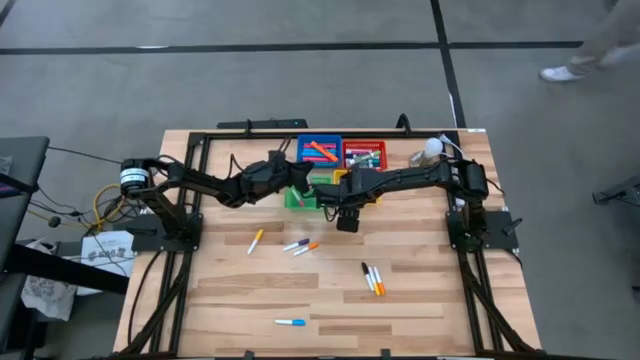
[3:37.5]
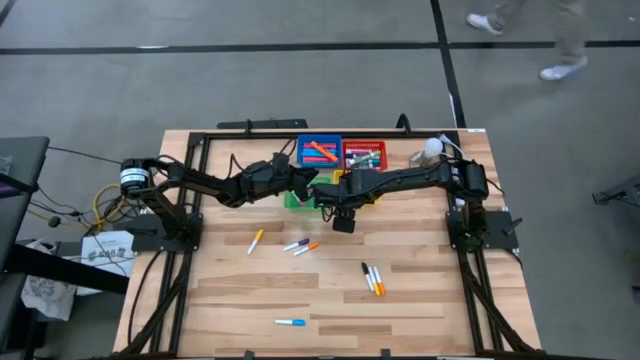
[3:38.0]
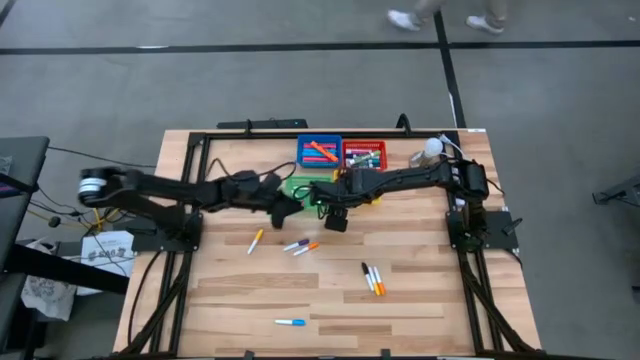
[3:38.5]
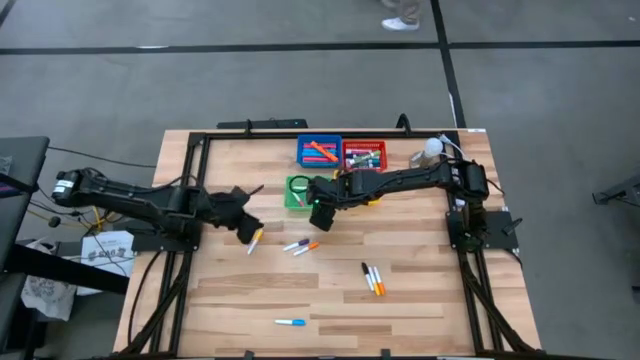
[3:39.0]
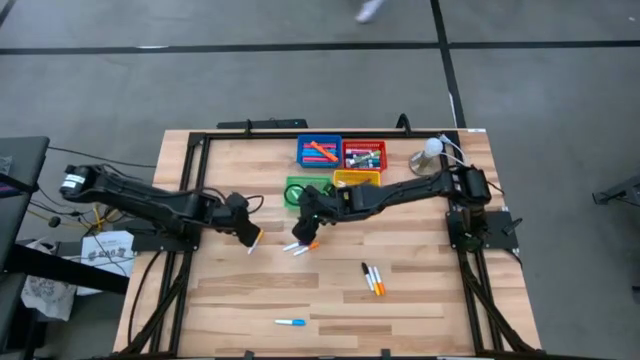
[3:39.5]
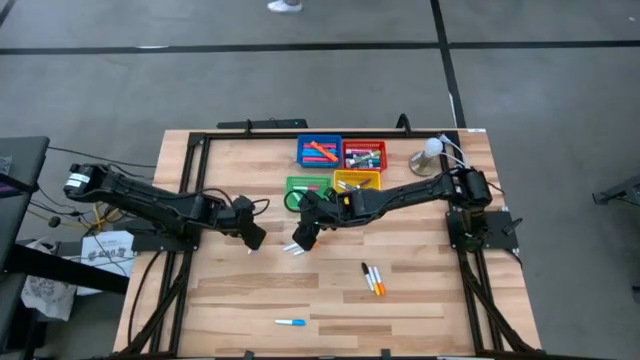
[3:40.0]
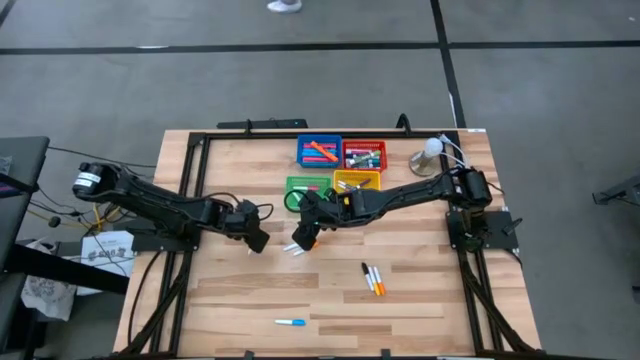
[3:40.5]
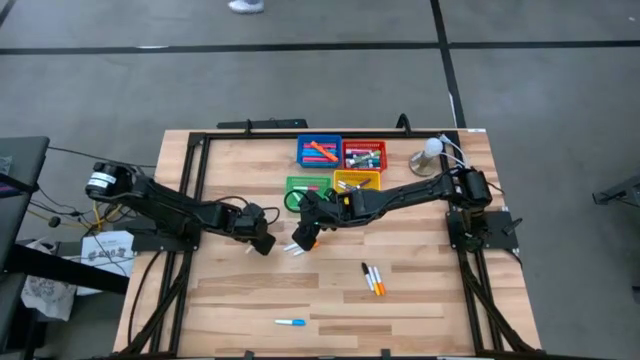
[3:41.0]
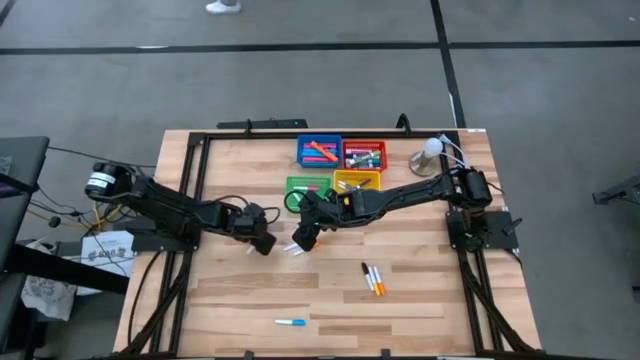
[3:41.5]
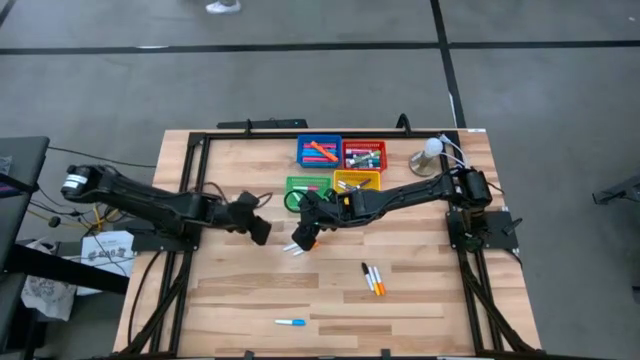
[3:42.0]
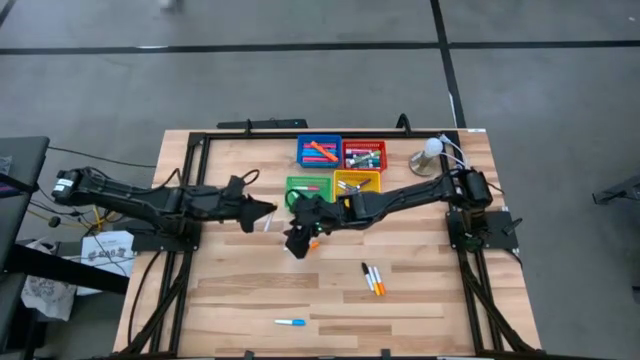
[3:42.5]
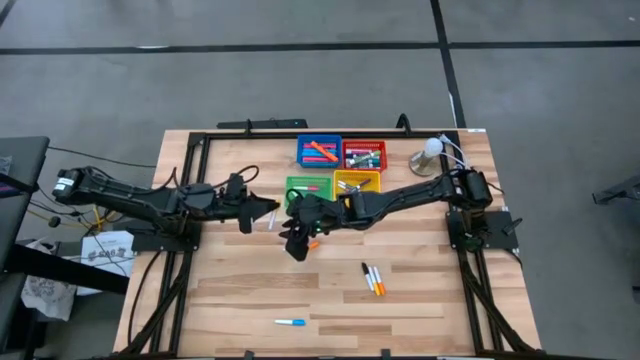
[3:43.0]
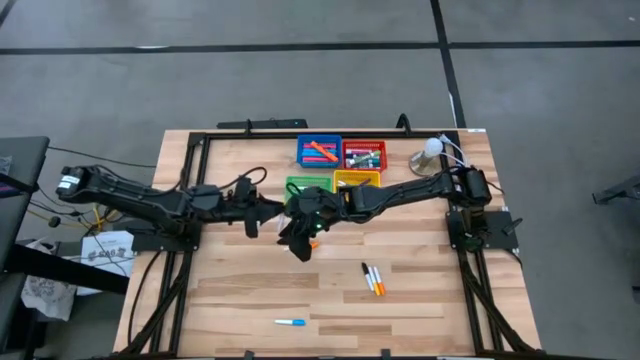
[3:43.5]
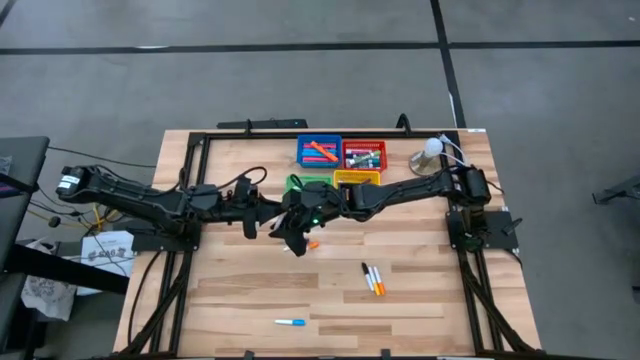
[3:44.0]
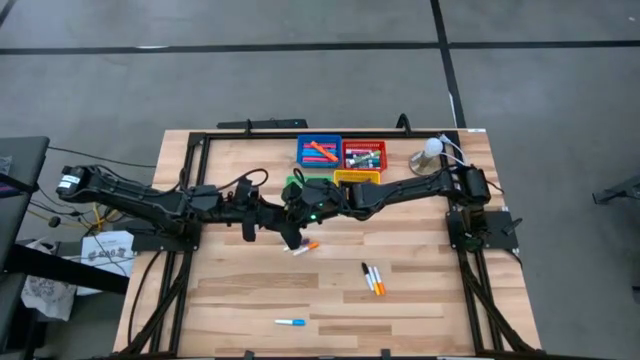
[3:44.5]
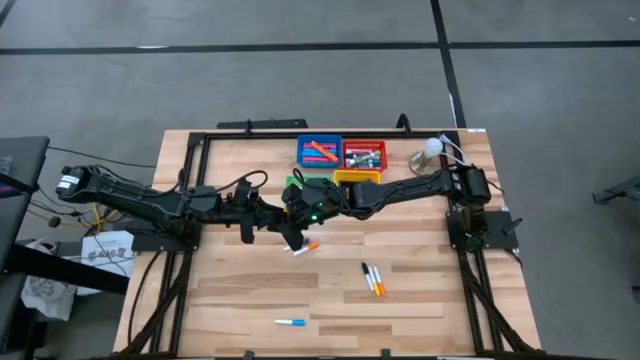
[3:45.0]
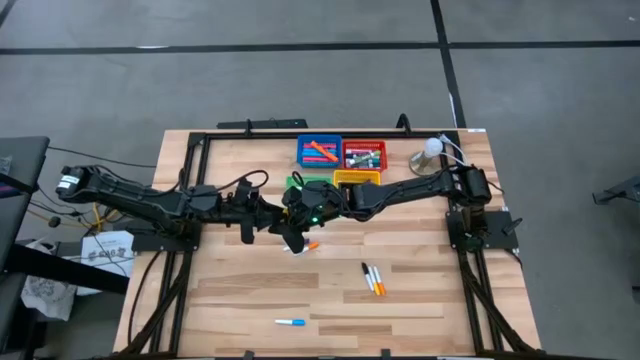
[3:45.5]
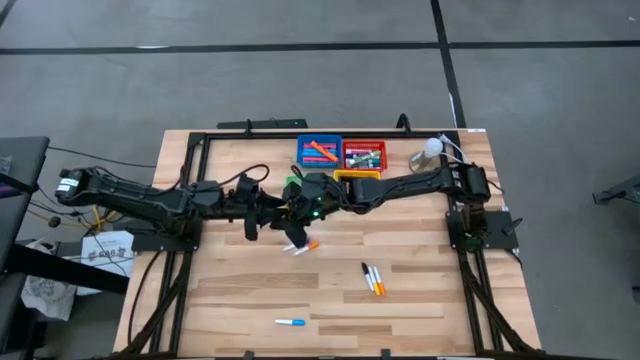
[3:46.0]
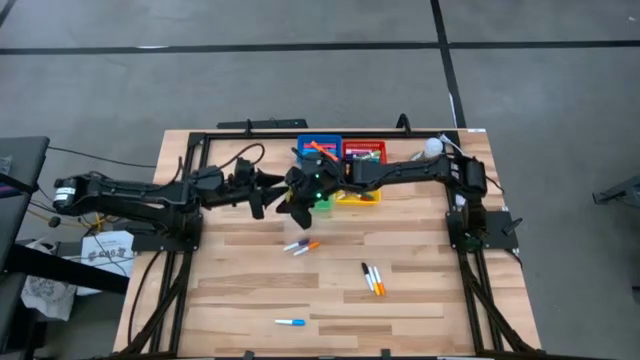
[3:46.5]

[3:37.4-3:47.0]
Task: Pick & Place Markers
Put the yellow mini marker into the green bin

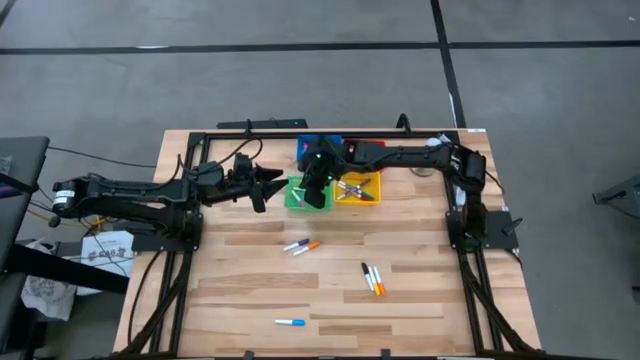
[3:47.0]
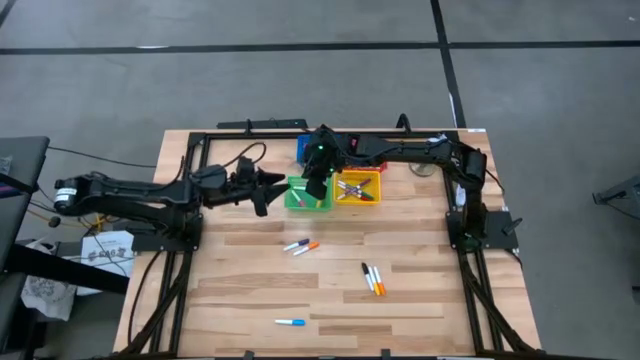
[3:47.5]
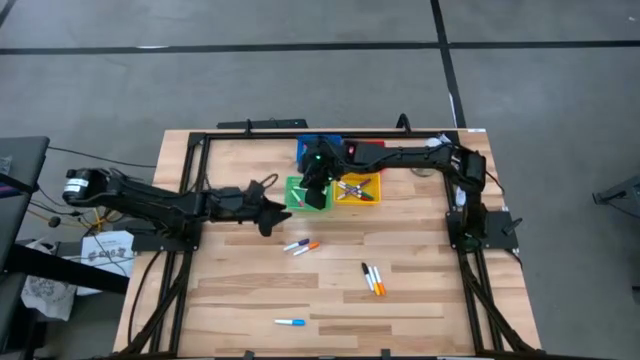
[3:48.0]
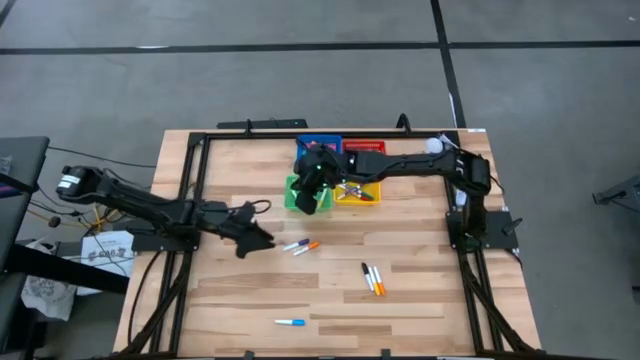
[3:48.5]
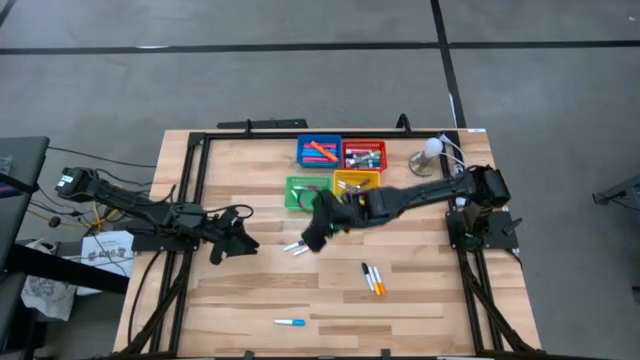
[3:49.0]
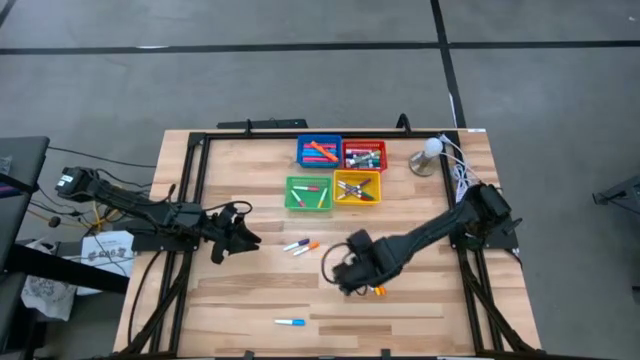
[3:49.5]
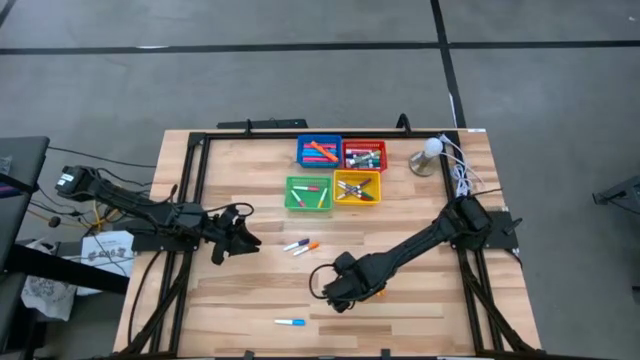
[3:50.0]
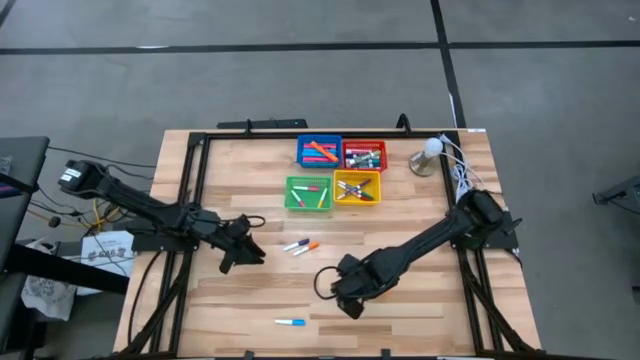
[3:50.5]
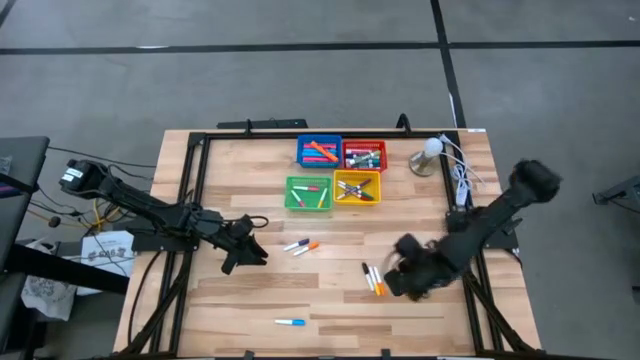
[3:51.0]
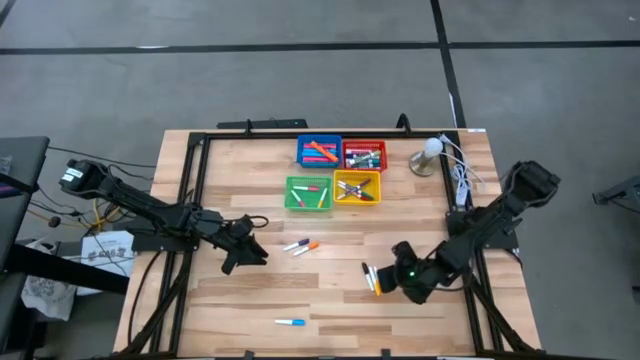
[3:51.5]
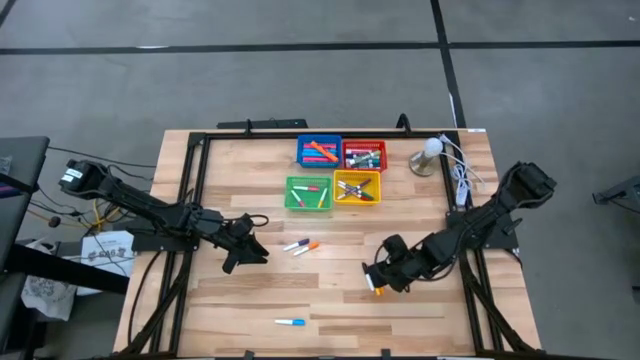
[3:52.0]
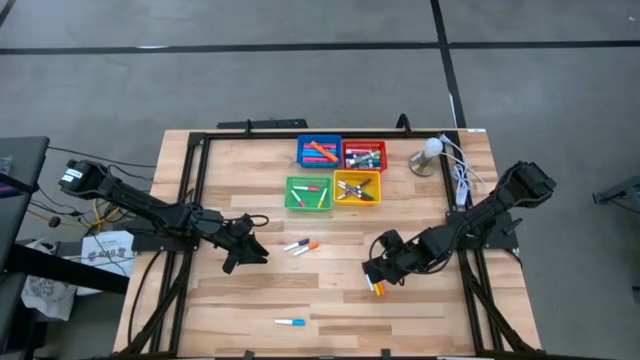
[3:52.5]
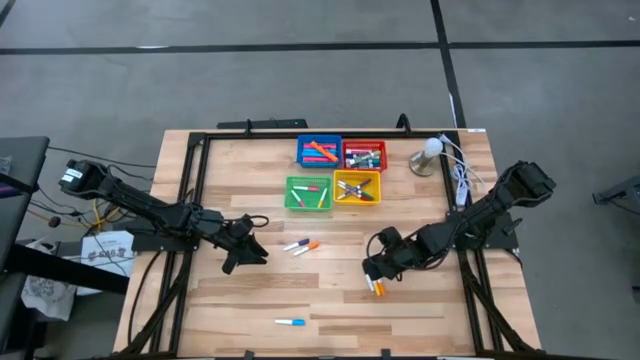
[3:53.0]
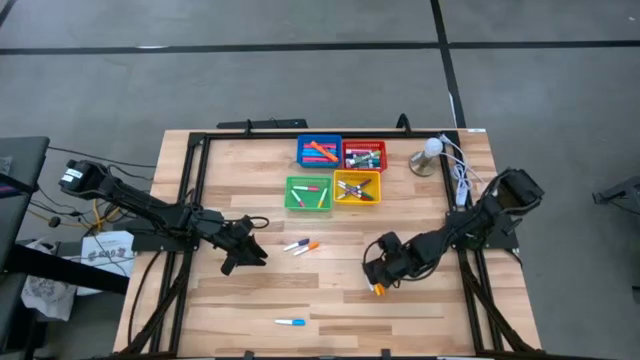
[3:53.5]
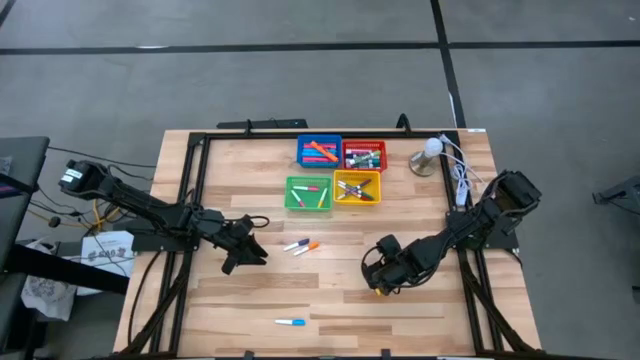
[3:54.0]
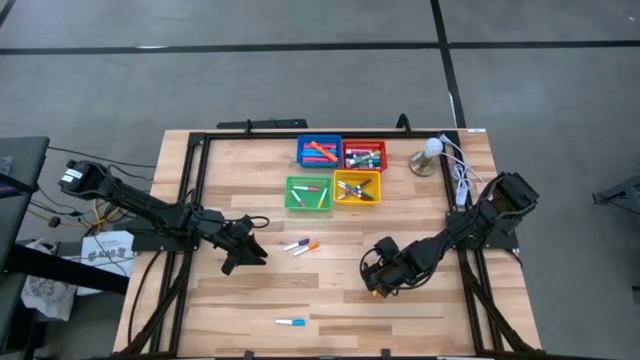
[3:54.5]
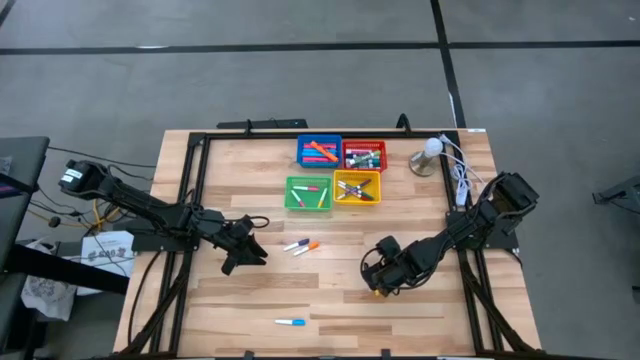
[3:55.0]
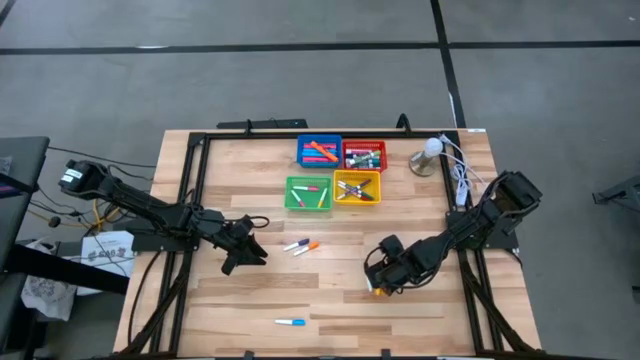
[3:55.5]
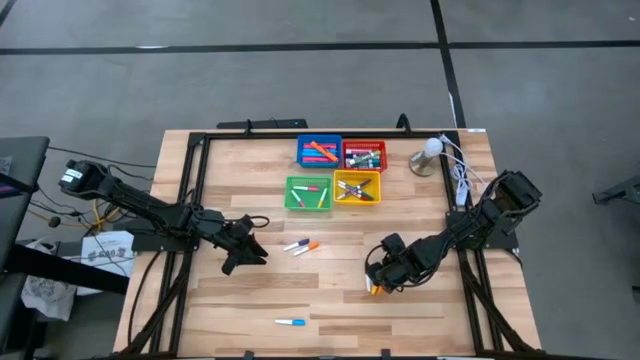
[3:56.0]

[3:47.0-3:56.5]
Put the orange mini marker into the green bin

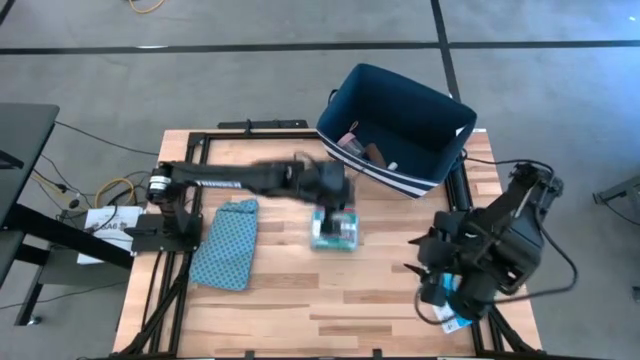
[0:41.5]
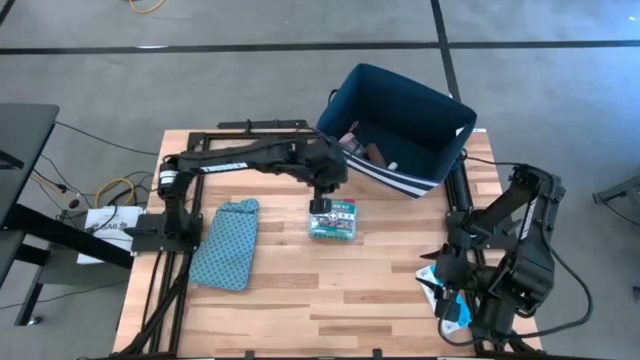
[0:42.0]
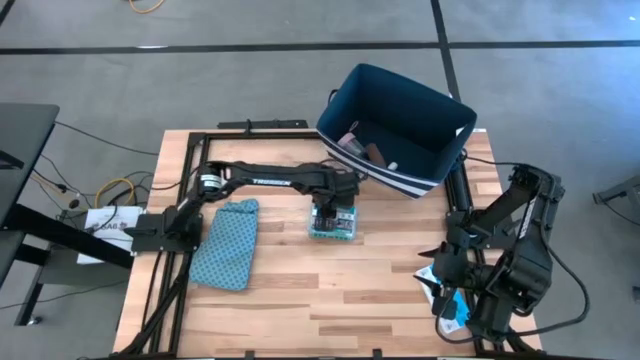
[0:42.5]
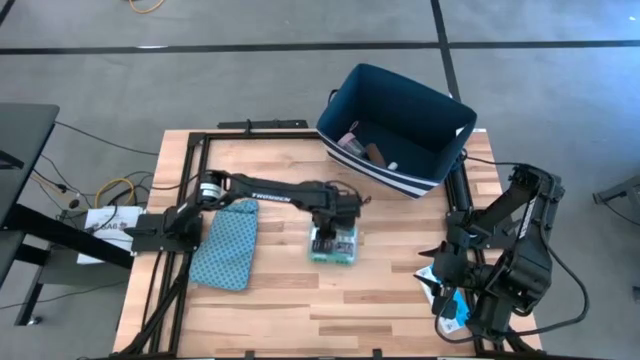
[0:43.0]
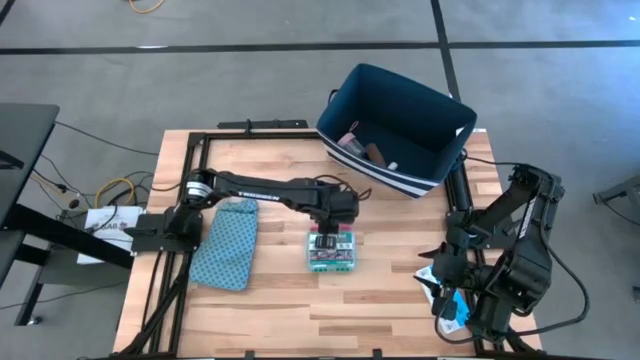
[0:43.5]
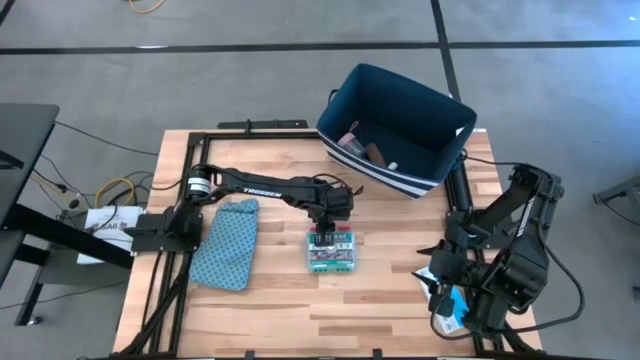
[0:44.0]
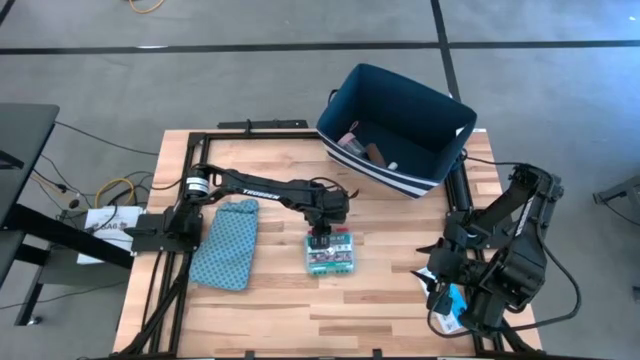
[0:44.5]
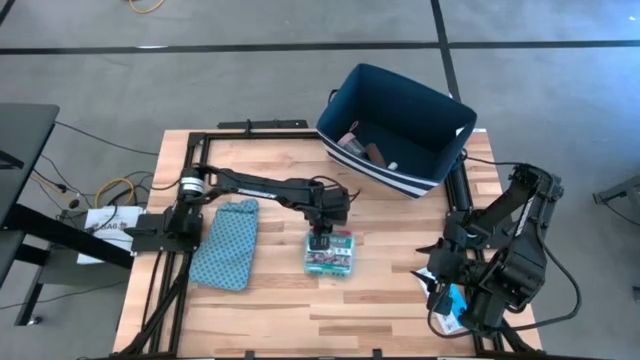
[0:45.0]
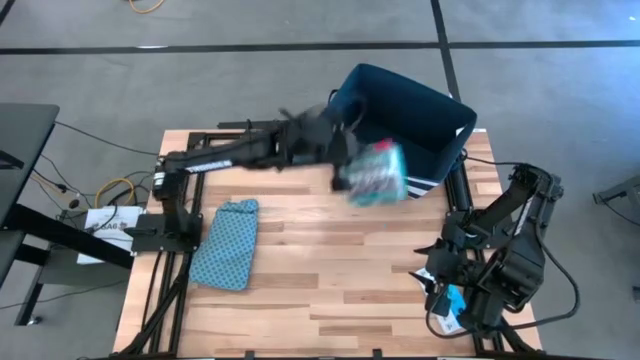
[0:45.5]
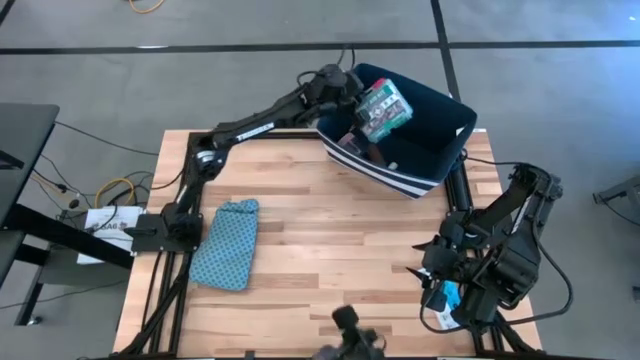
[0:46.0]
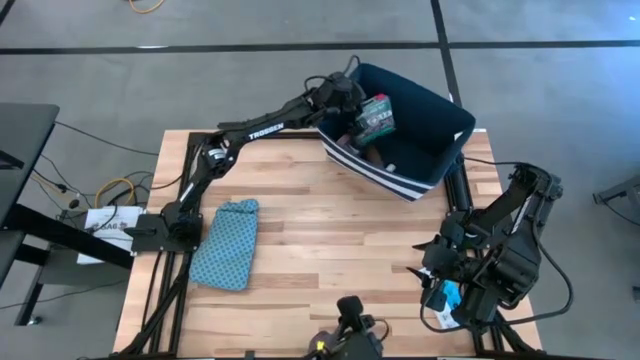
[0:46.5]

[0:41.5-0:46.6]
Task: Pick & place medical supplies in basket/bin
Put the blue first aid kit into the blue organizer bin
